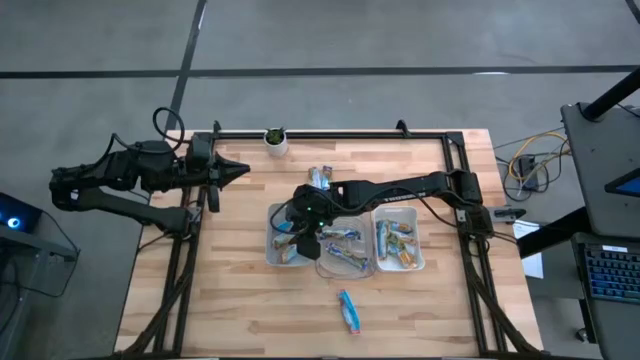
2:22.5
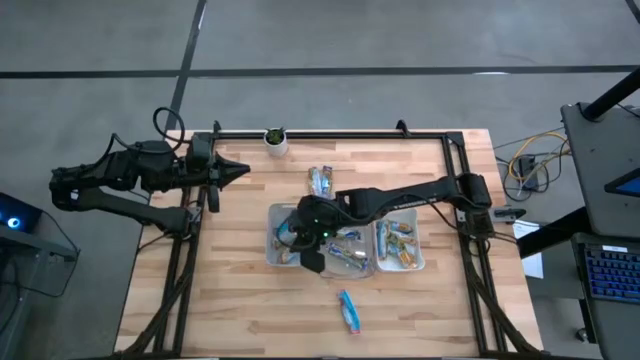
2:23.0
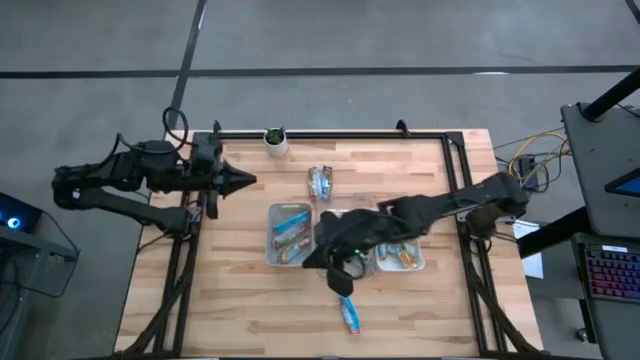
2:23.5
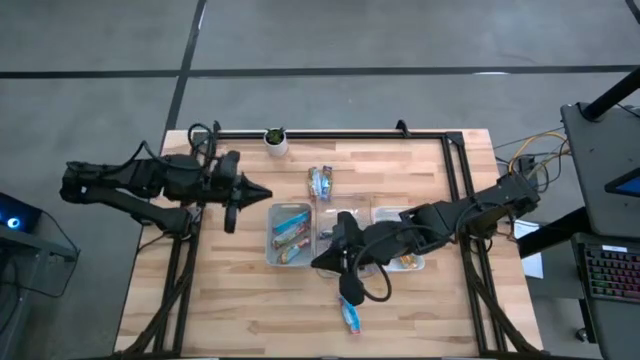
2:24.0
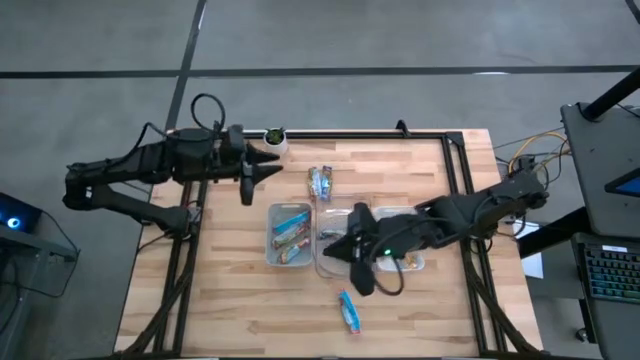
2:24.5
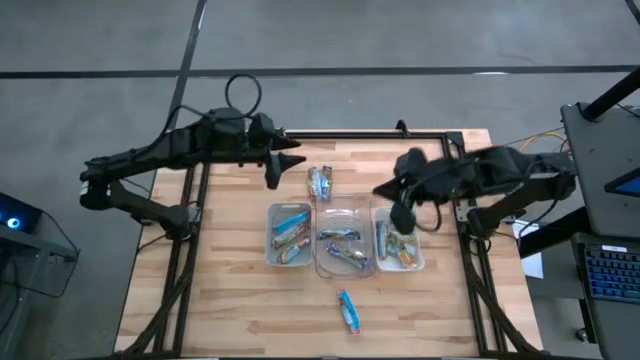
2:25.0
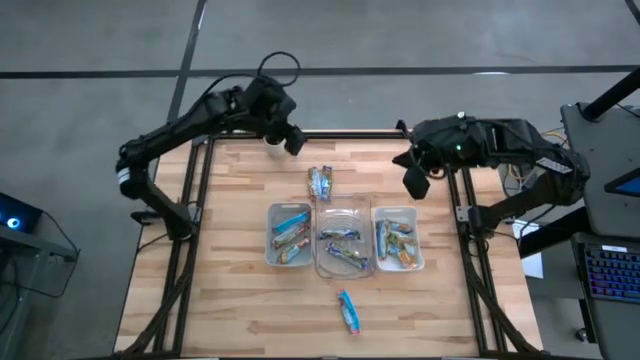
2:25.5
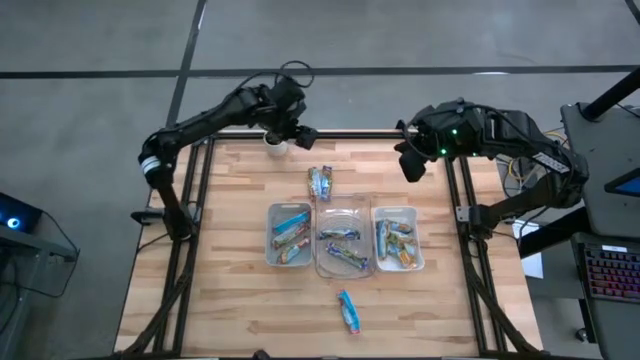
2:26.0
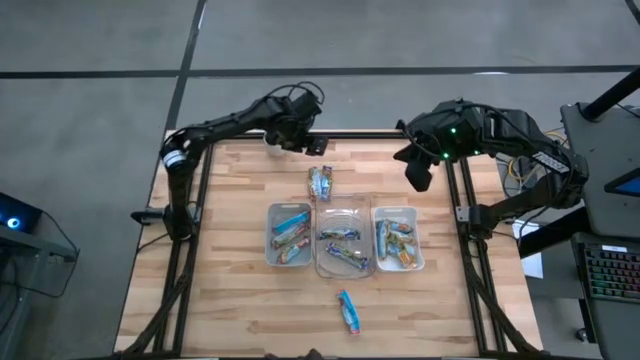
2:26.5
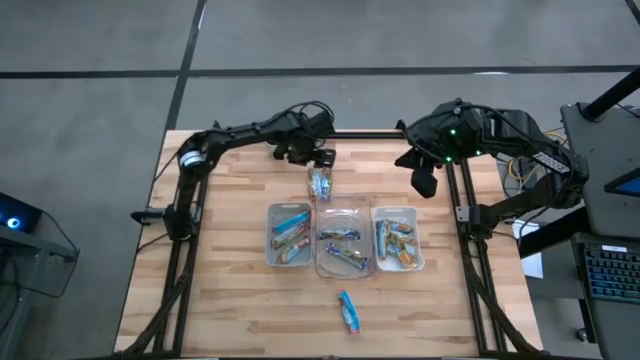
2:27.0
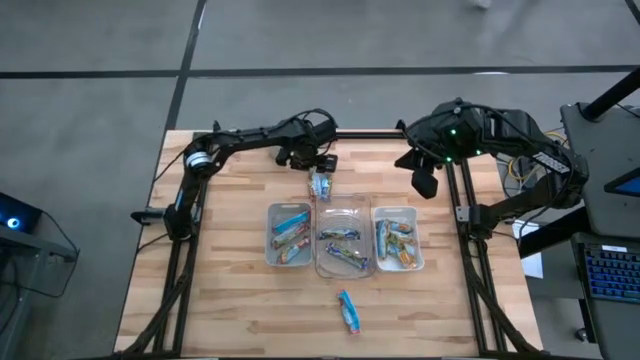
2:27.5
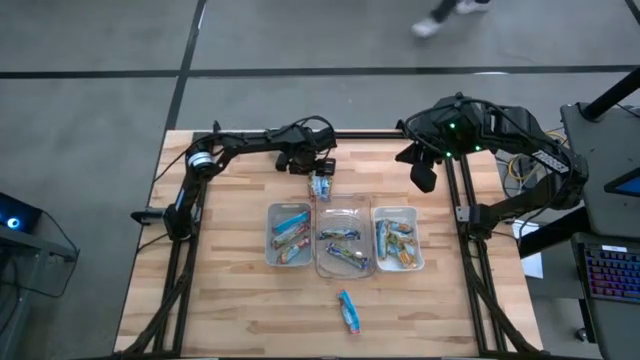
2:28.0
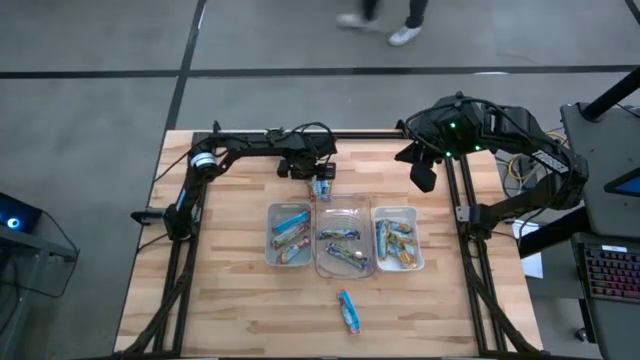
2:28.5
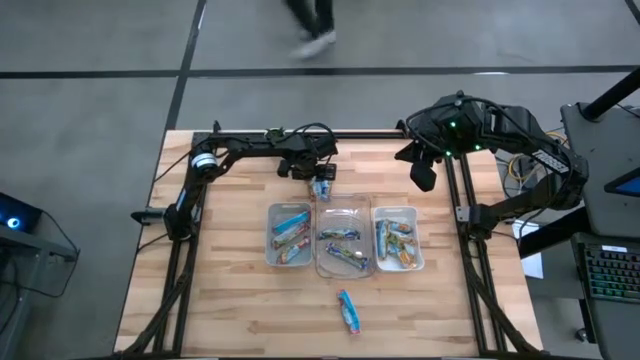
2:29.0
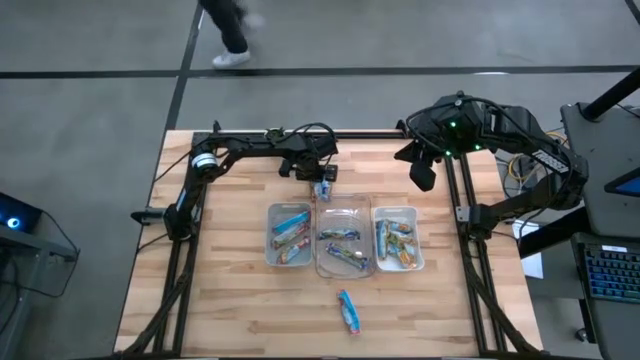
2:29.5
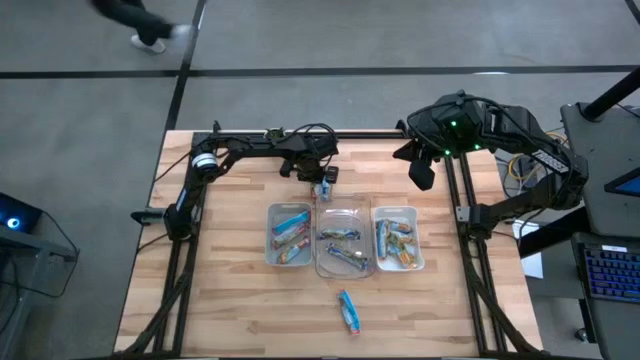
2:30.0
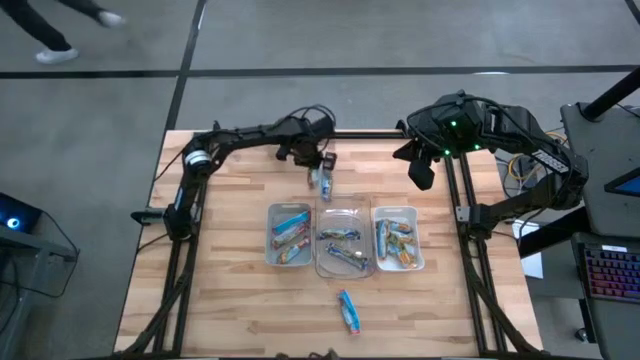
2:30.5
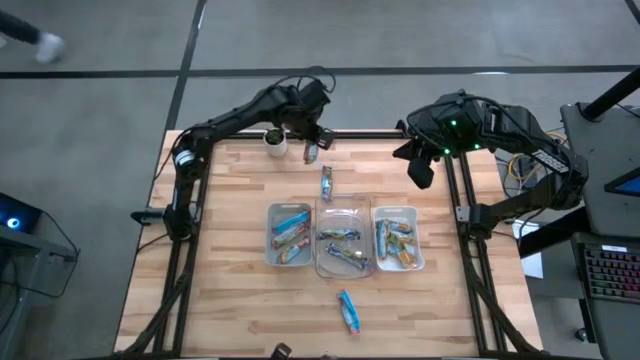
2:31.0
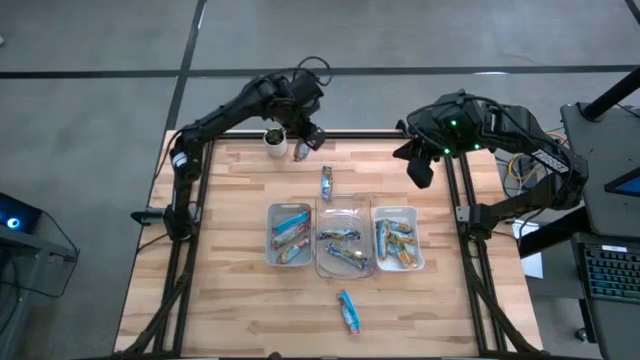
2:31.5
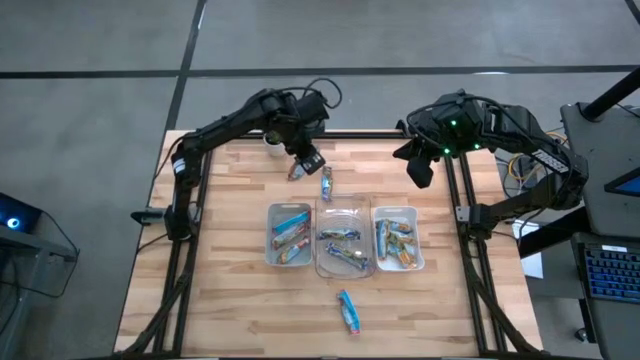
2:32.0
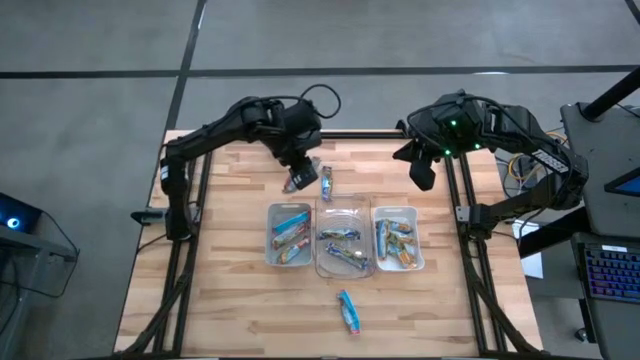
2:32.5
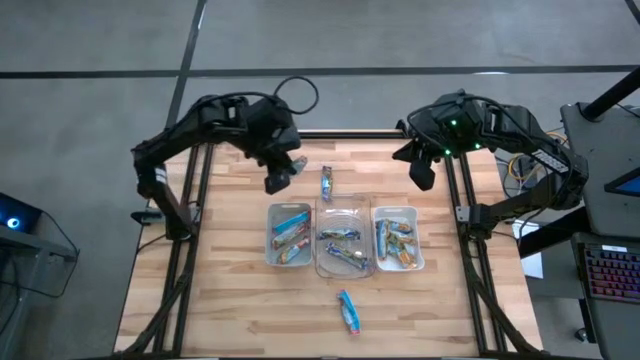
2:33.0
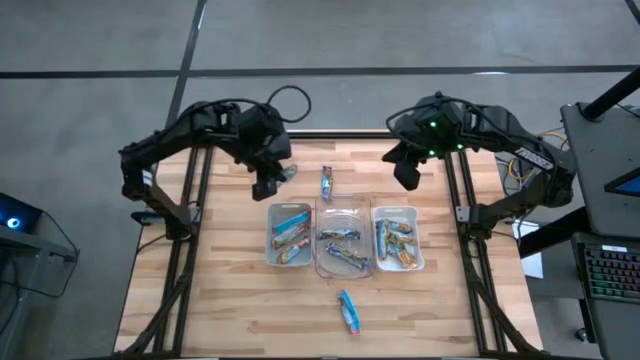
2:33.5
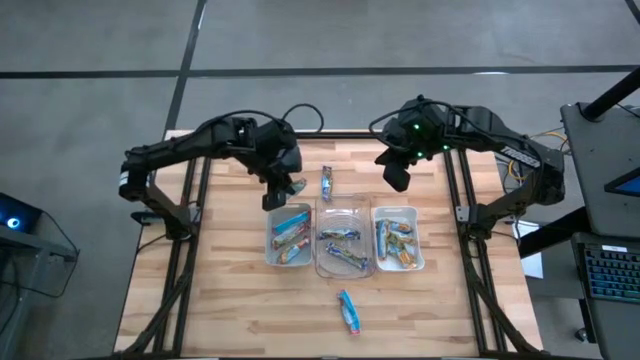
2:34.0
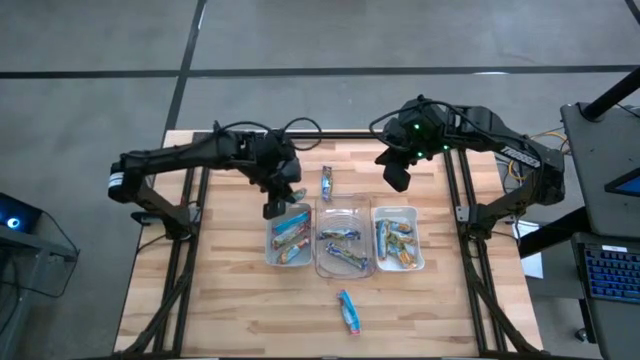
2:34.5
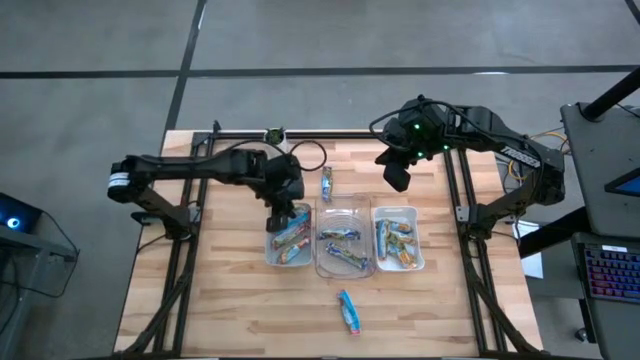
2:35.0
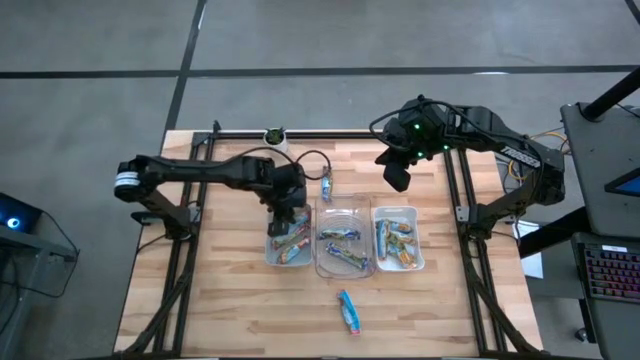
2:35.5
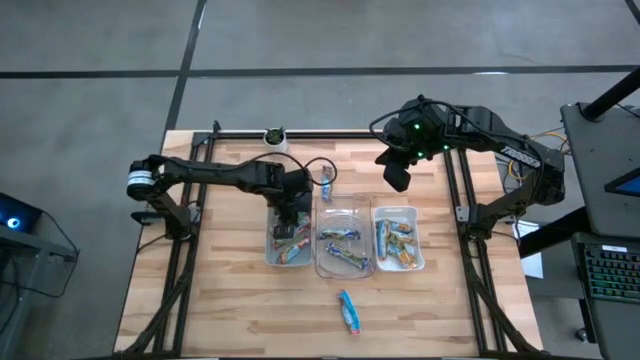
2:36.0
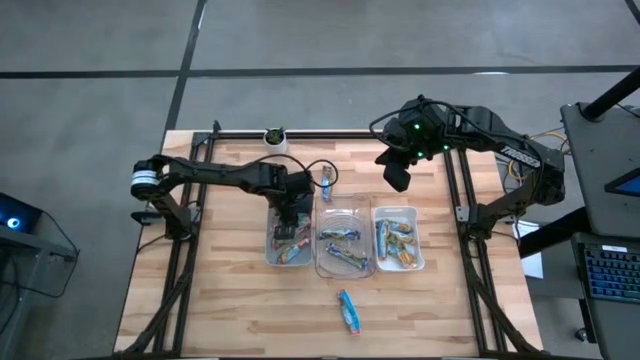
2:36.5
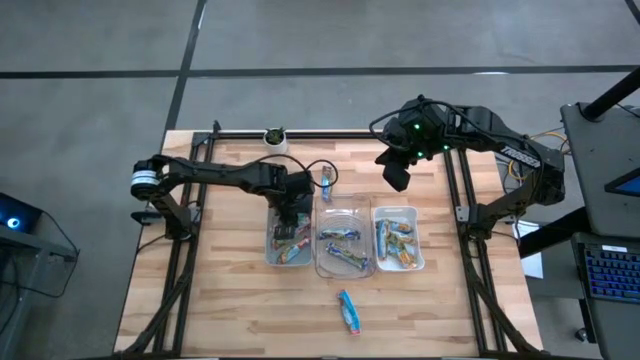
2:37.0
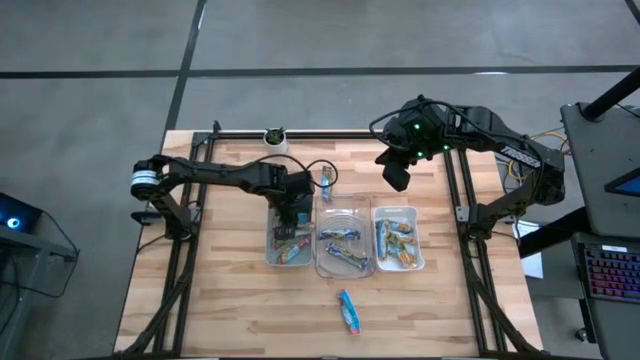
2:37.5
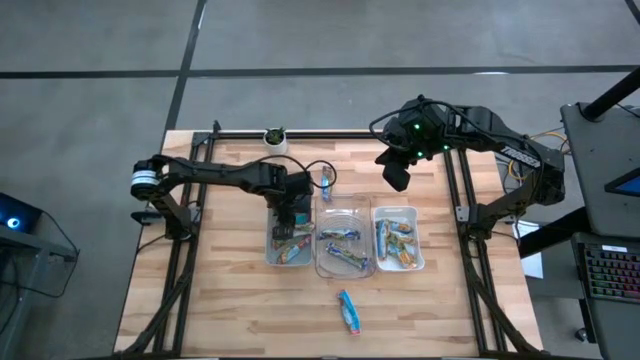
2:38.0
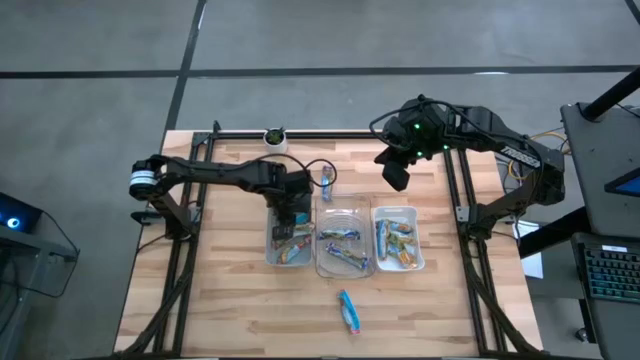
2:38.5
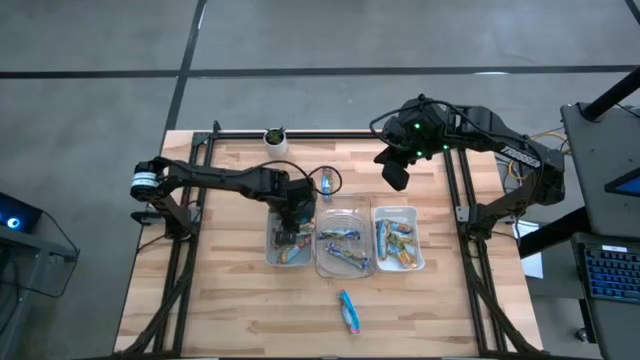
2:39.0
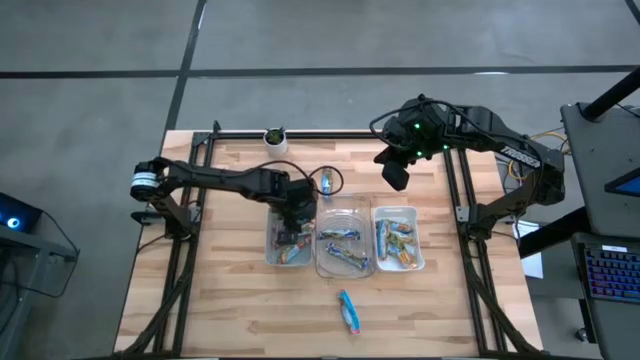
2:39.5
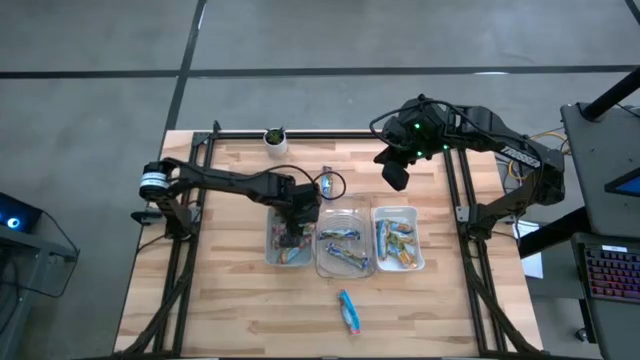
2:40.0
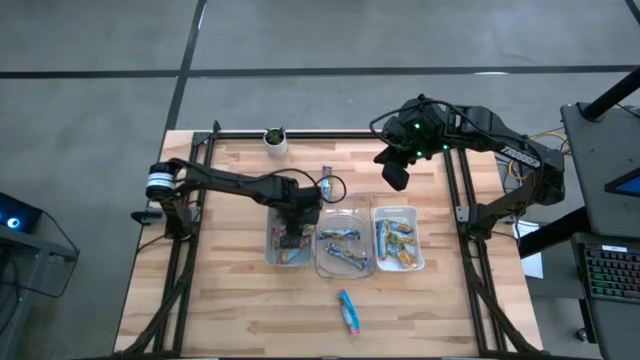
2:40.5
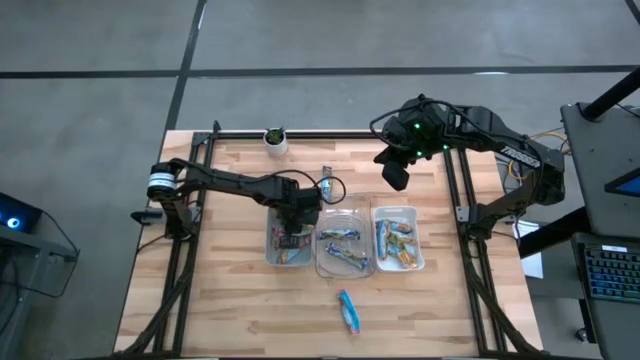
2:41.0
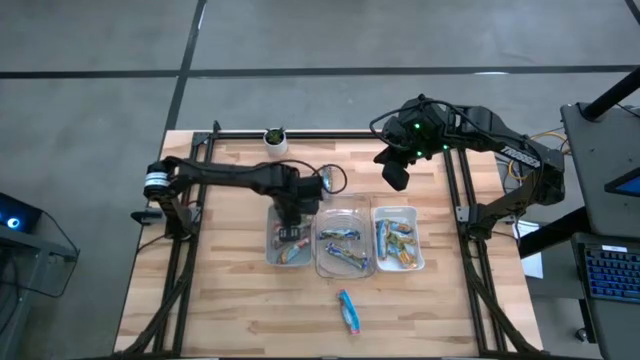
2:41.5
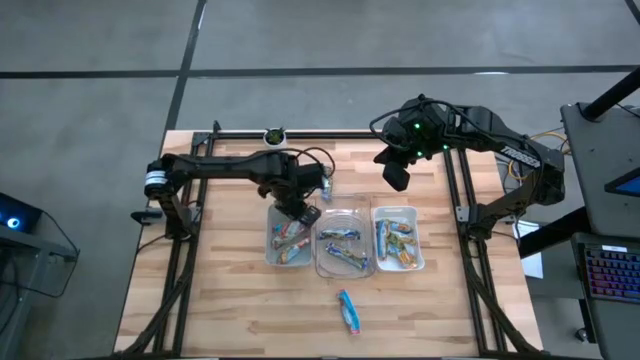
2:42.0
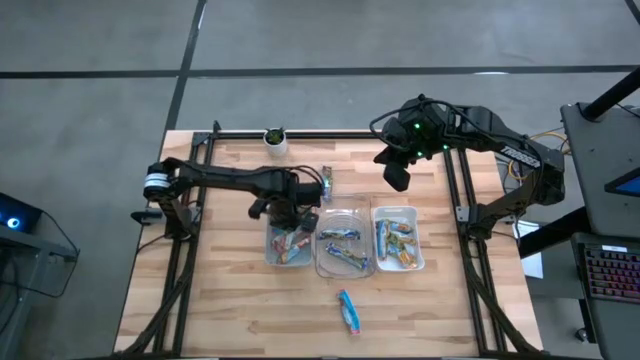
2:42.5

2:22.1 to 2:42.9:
Task: Pick and place Granola Bars by type
Put the top red granola bar into the gray bin
